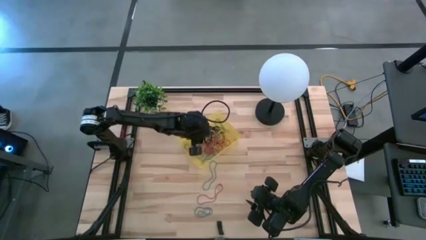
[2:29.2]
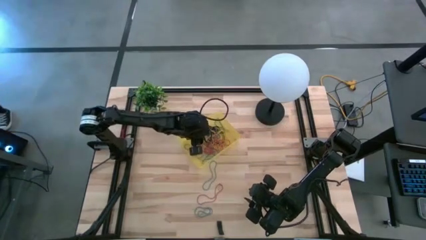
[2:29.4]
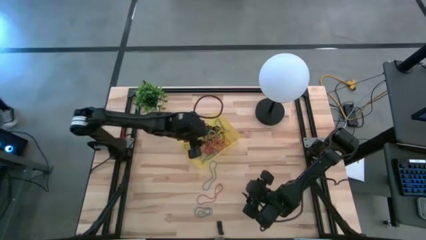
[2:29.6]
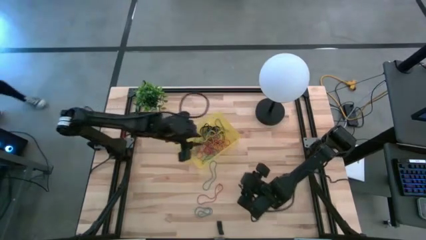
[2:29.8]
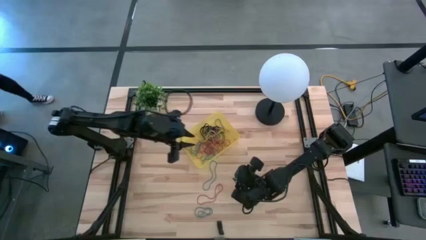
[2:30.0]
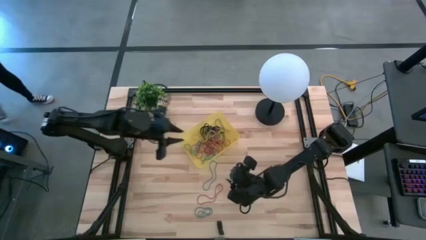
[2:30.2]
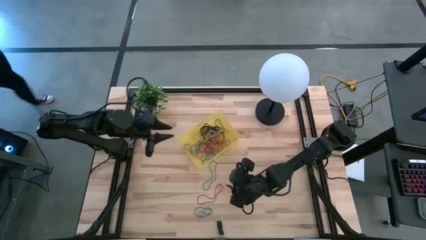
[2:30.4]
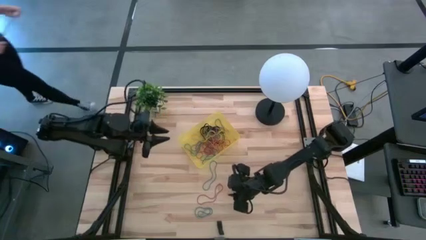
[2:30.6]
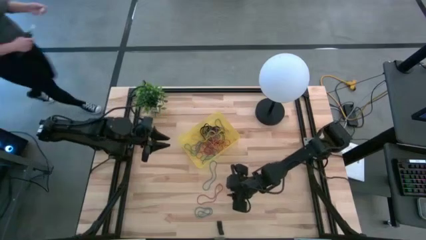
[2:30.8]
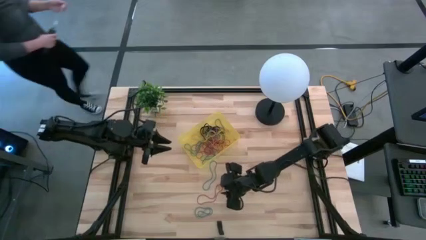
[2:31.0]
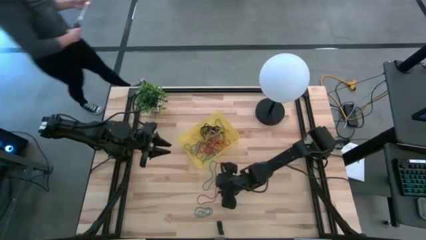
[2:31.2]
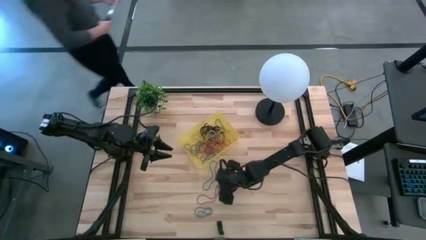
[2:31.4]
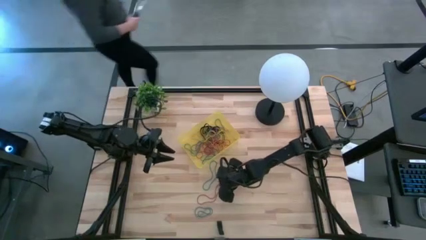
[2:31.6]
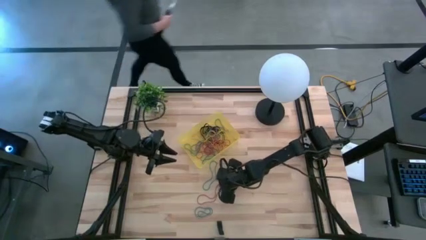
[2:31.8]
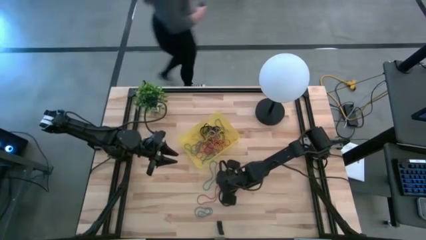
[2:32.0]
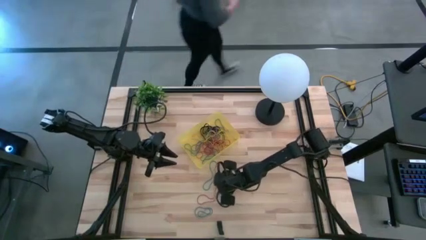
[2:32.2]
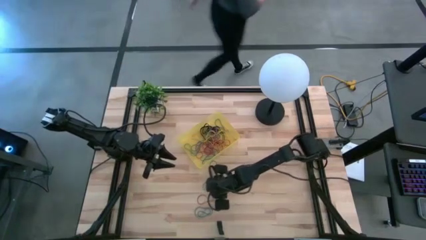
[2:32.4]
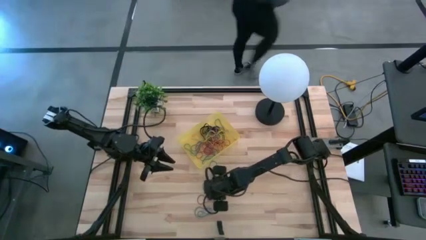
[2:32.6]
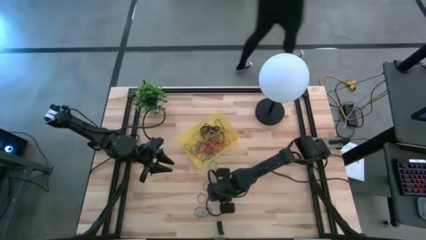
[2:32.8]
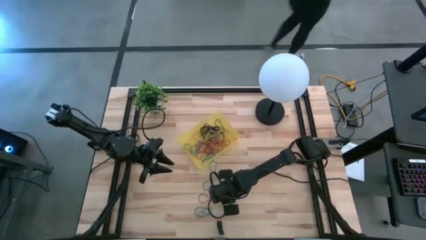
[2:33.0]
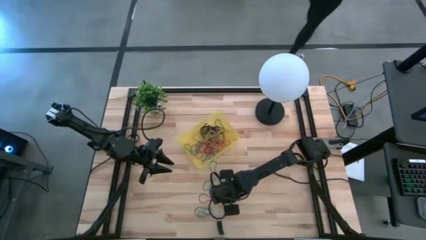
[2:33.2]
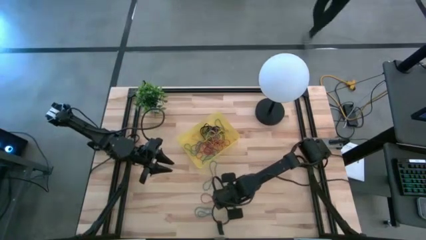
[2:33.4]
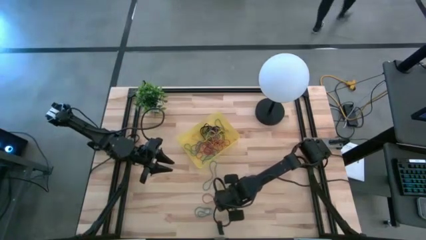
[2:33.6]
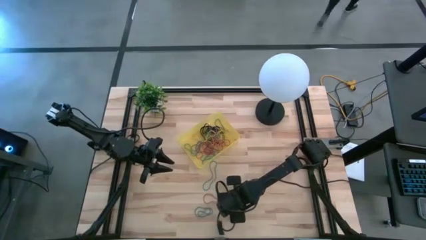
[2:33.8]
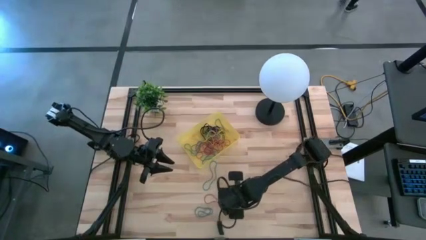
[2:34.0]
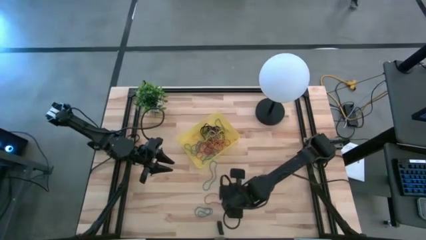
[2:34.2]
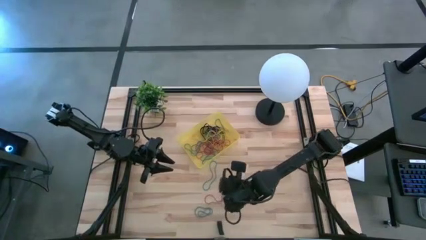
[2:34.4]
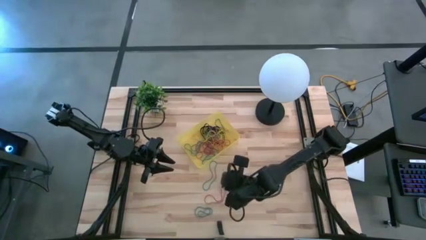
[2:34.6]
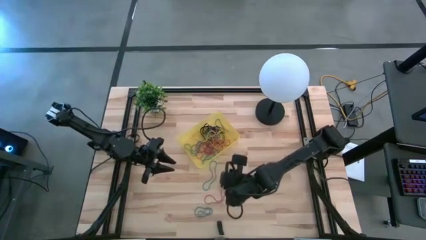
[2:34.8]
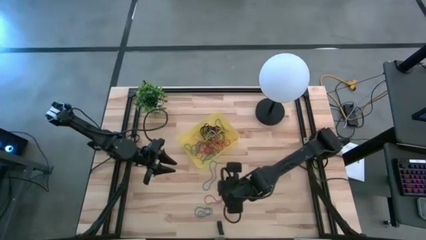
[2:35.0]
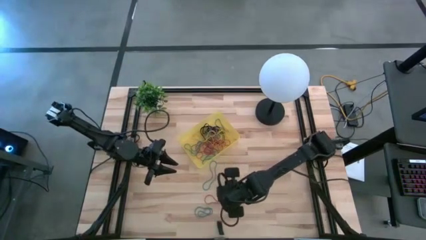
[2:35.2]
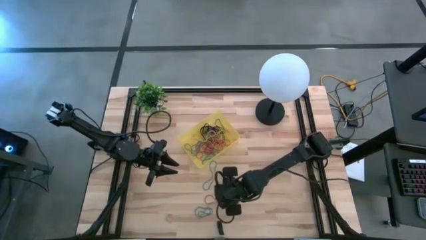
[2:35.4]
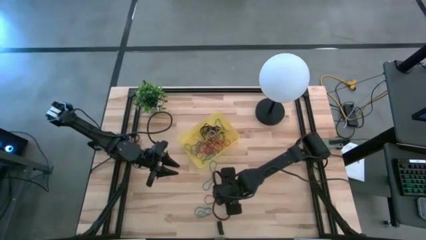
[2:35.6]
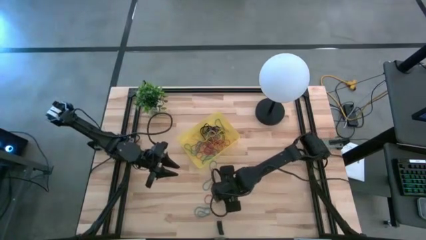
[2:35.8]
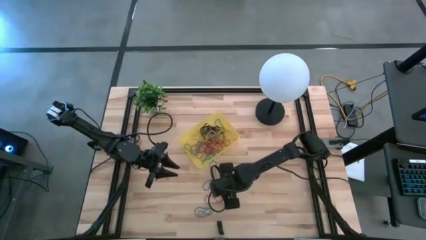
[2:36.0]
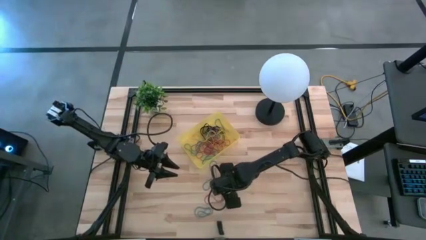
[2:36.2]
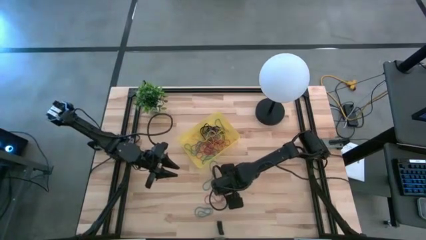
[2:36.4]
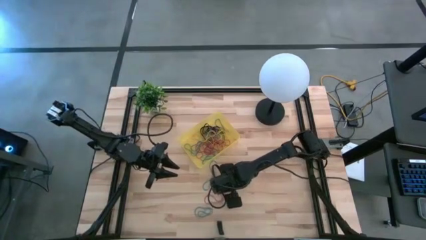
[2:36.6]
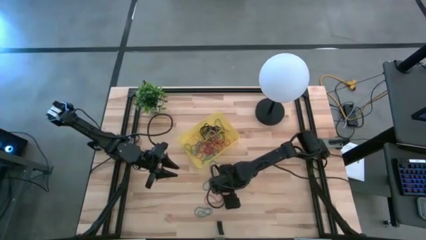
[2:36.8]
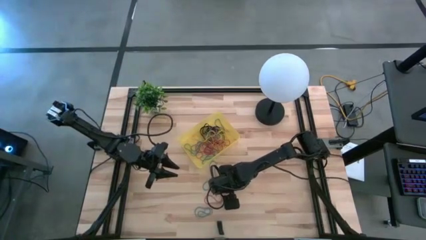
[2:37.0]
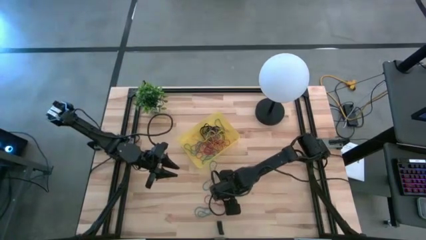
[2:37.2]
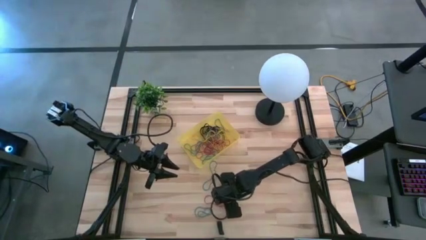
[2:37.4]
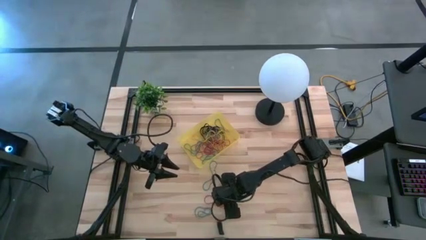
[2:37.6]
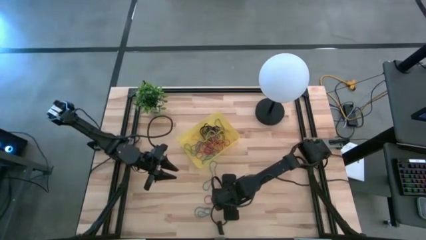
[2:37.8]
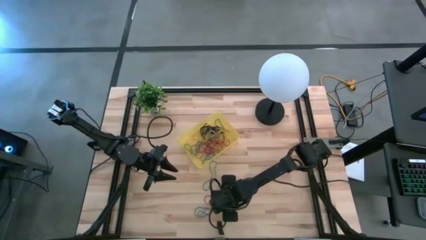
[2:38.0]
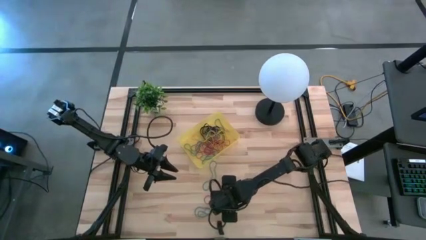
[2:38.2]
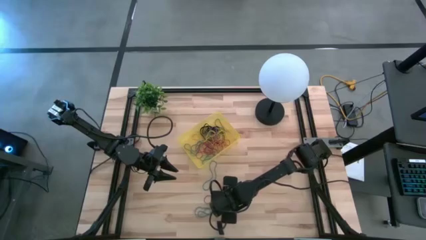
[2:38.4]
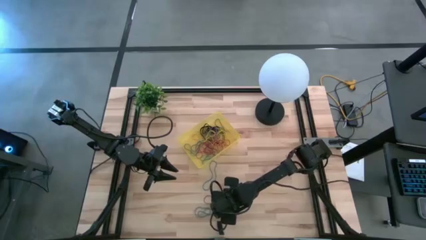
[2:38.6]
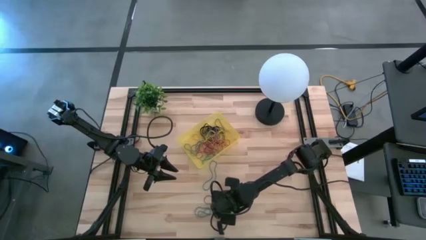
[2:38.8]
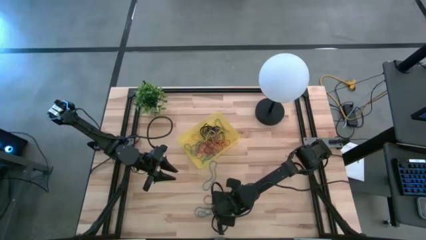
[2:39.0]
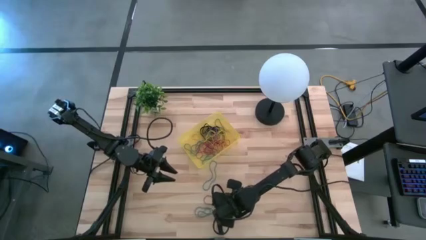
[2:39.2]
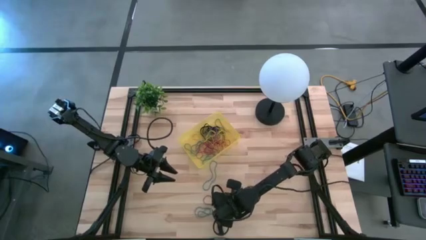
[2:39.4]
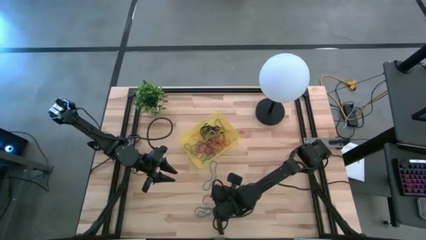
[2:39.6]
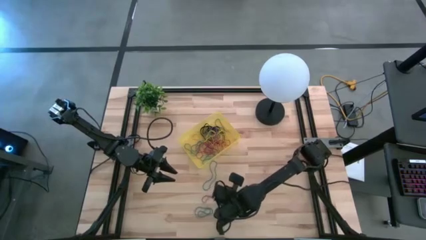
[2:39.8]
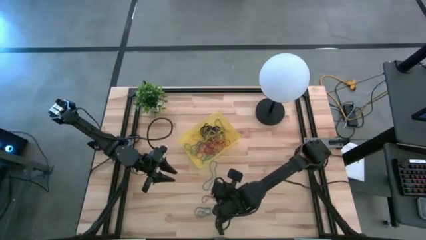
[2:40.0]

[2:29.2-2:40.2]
Task: Pick and place rubber bands into bin
Put the red rubber band into the yellow bin

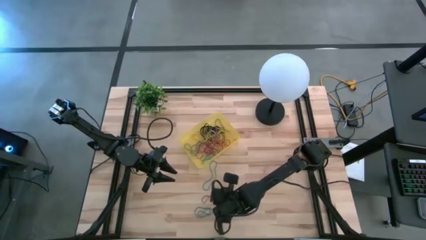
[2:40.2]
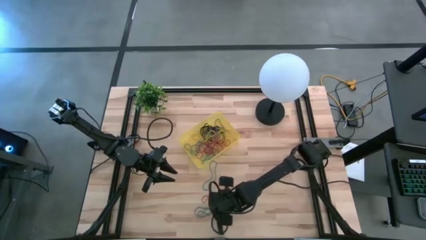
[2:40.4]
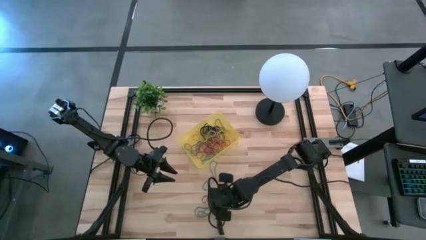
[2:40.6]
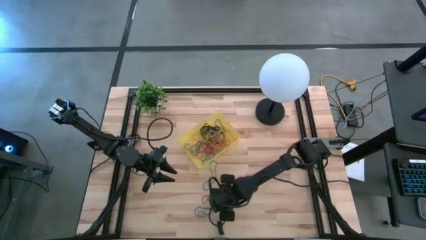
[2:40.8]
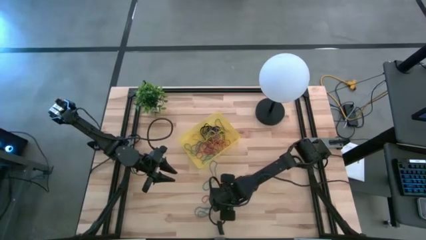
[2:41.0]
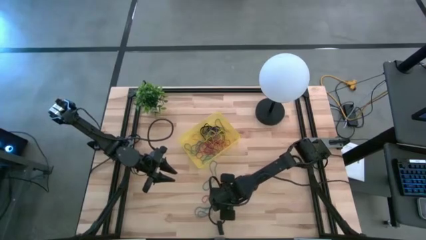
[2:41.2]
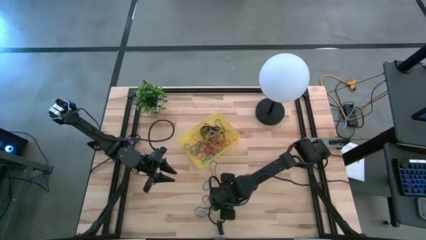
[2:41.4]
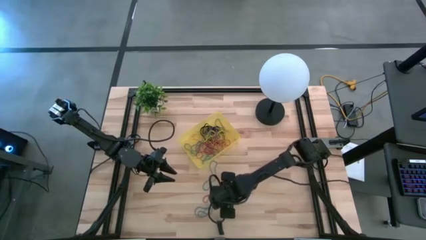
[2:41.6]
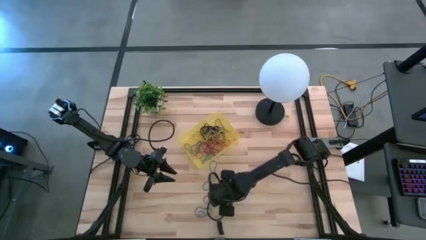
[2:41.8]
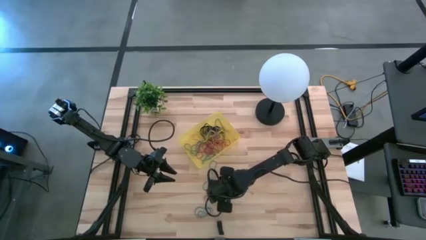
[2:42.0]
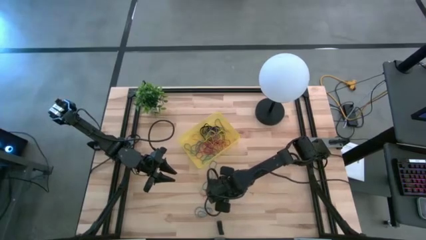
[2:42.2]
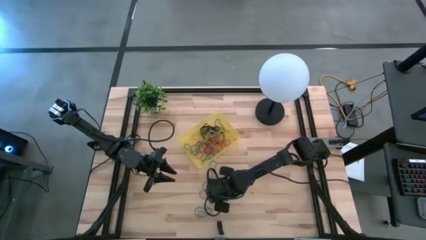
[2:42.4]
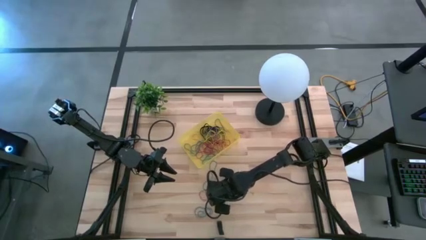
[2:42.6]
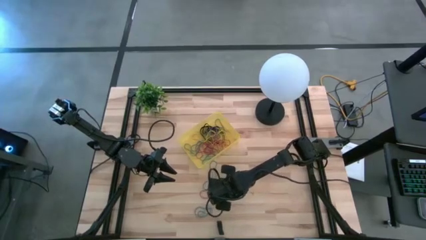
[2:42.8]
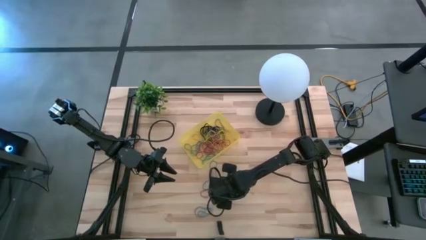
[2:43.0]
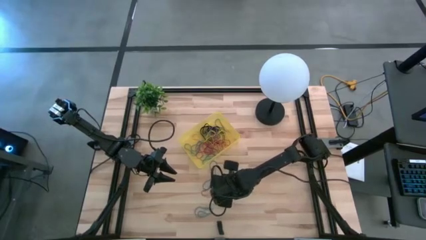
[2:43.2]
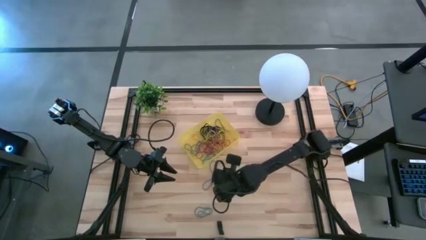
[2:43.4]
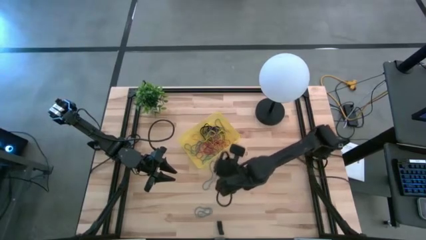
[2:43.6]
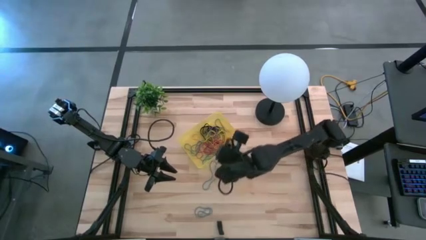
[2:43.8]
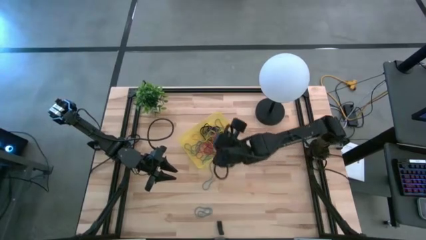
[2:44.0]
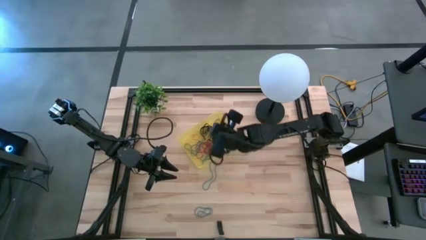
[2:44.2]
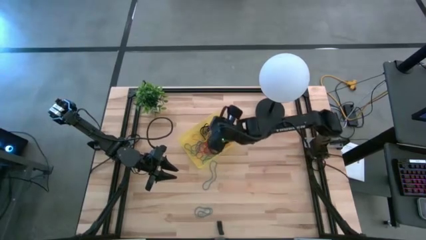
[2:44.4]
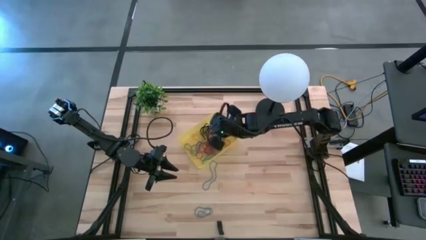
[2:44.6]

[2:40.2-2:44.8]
Put the red rubber band into the yellow bin

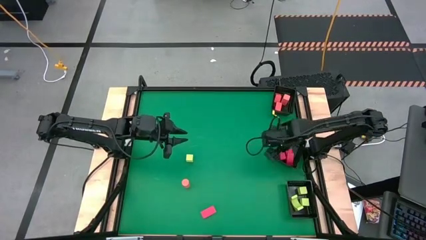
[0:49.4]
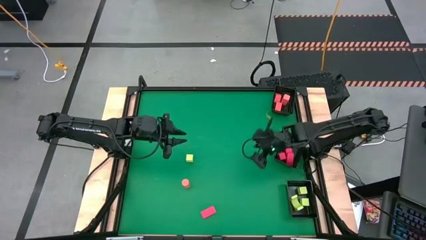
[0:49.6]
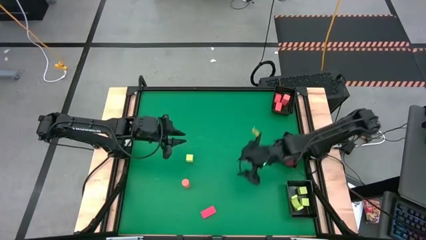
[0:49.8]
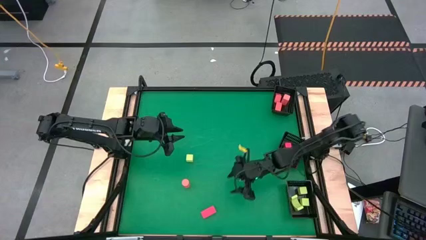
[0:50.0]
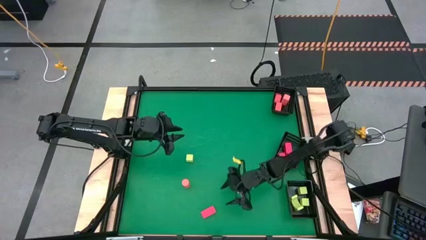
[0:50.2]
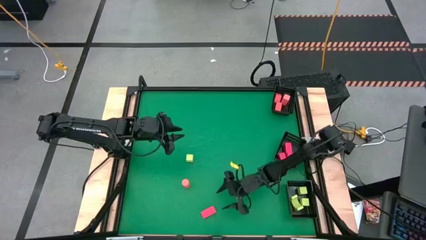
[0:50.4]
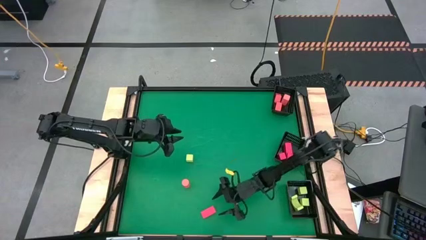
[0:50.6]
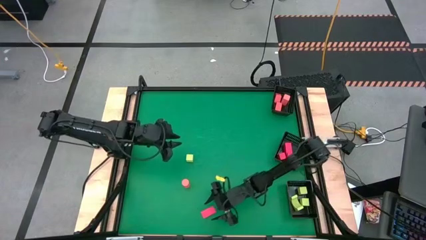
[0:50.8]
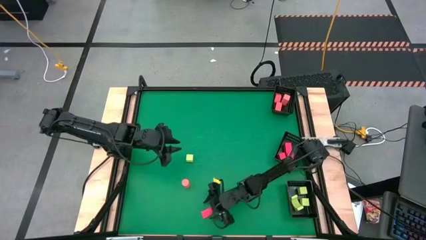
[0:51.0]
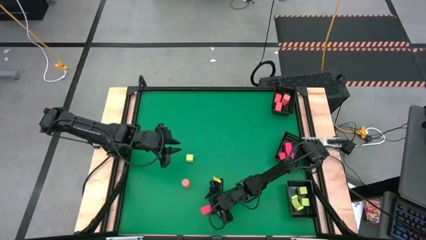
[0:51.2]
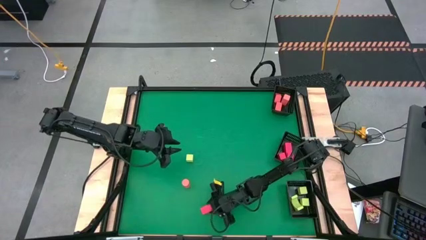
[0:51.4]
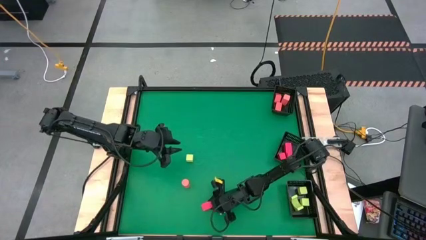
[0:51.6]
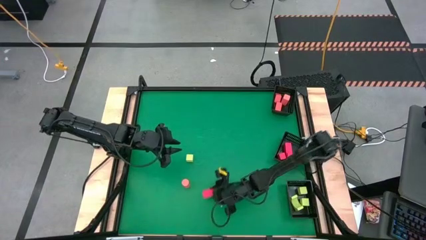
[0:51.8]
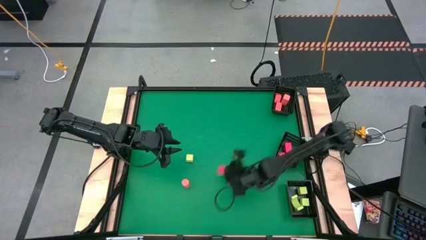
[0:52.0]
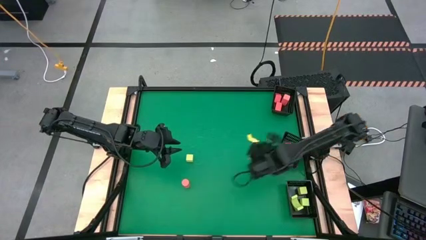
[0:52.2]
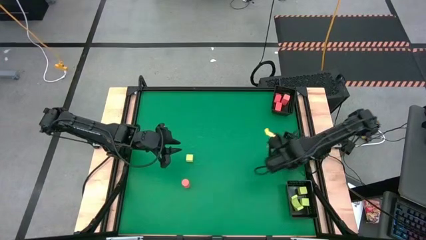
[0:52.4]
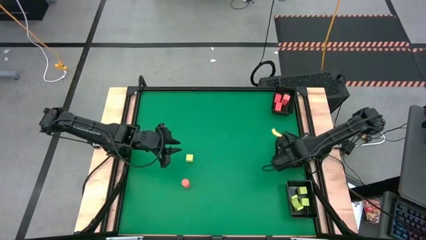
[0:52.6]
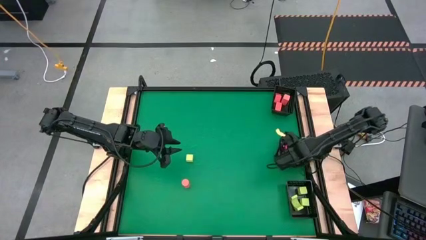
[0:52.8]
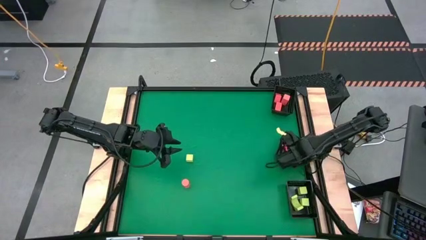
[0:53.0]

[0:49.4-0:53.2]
Task: Sort & place blocks by color
Put the bottom red block into the middle right black bin
